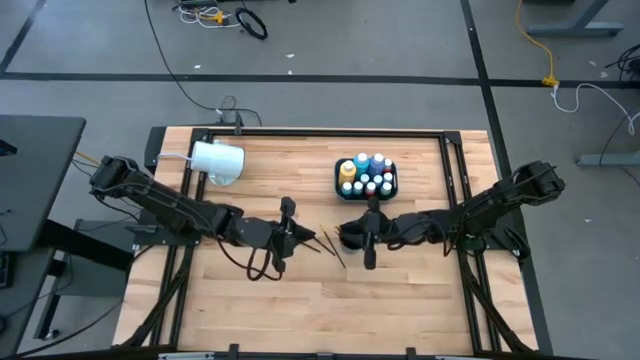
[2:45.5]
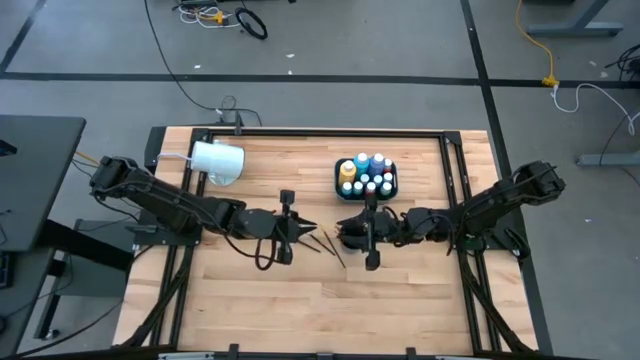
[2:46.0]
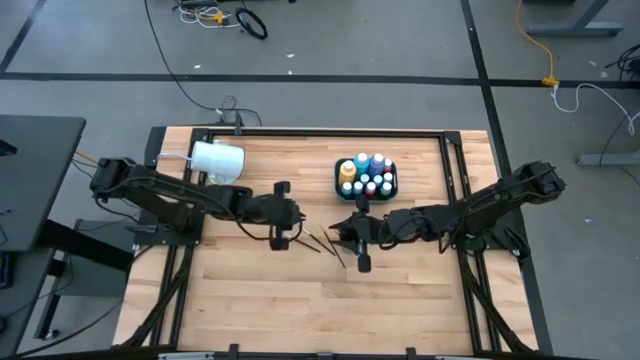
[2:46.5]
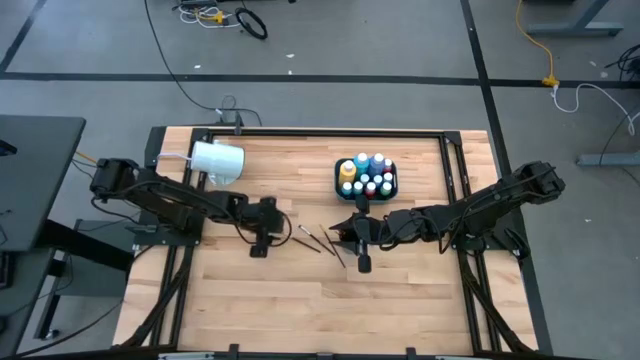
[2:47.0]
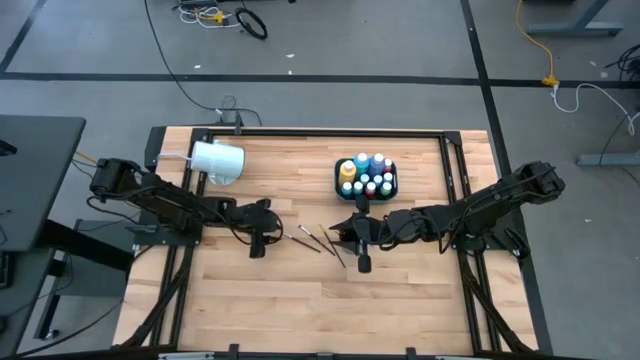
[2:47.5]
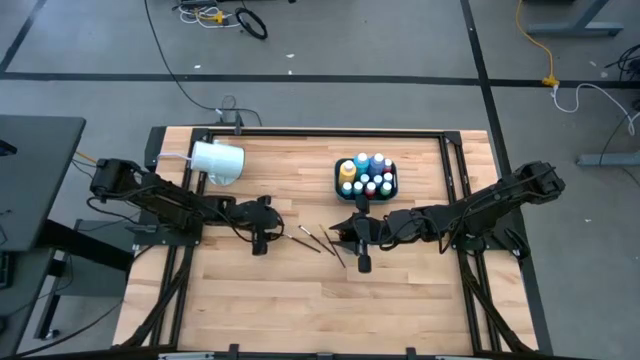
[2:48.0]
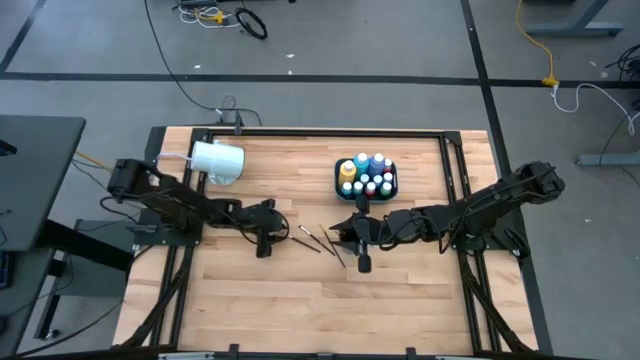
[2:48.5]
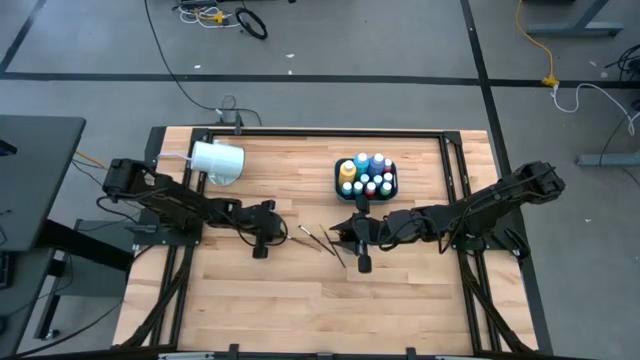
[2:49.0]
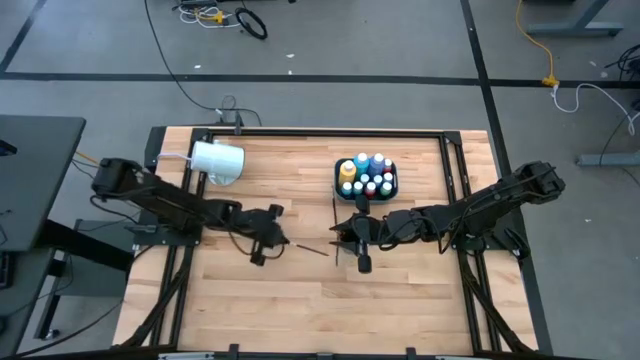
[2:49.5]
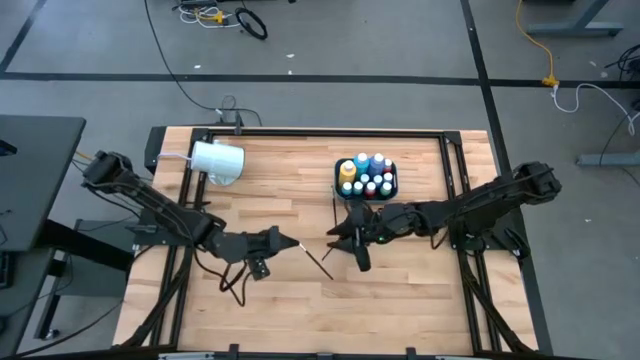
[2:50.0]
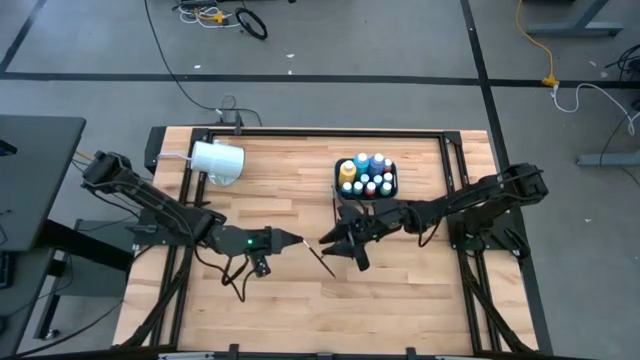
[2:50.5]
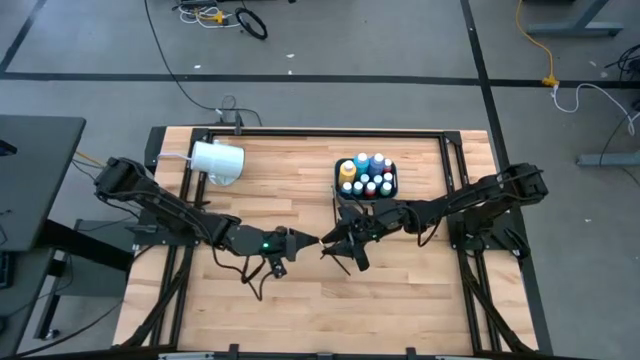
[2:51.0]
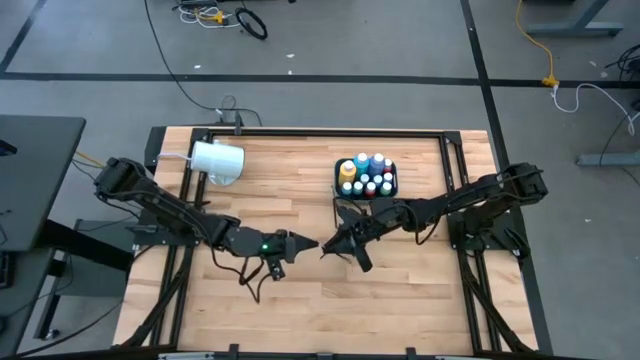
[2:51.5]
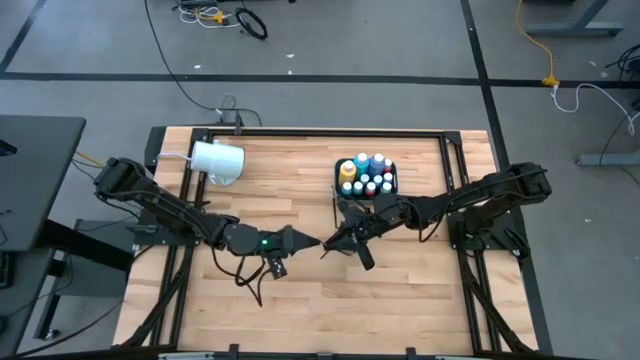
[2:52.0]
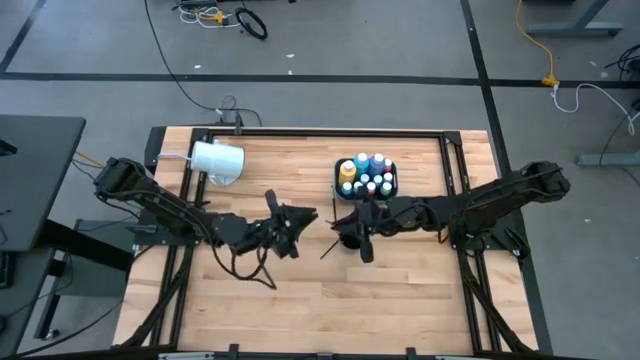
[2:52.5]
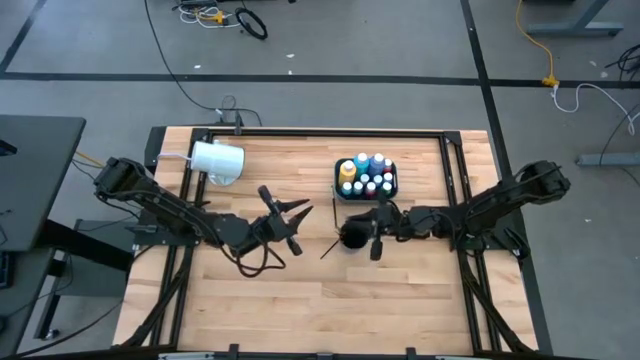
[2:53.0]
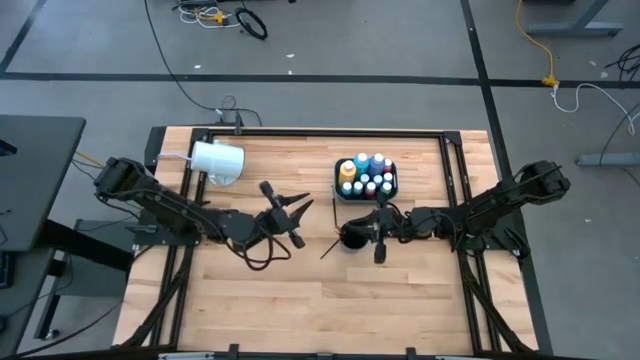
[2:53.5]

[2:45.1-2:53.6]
Task: Pick & Place Paint Supplies
Put the left silver paint brush into the cup

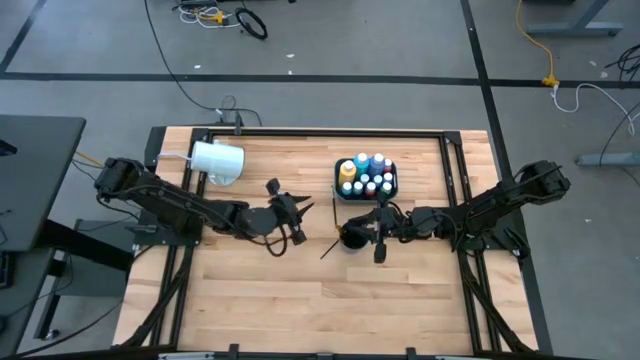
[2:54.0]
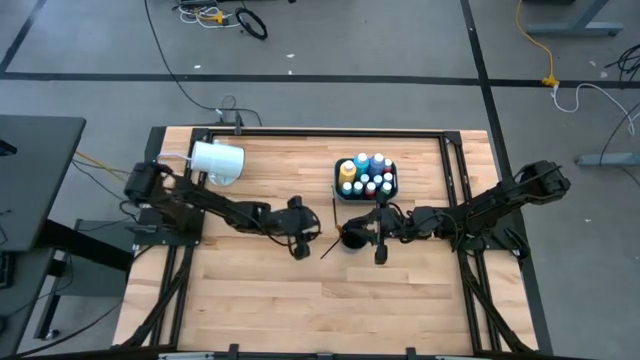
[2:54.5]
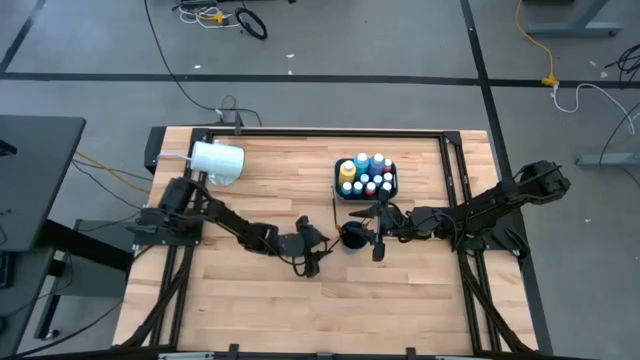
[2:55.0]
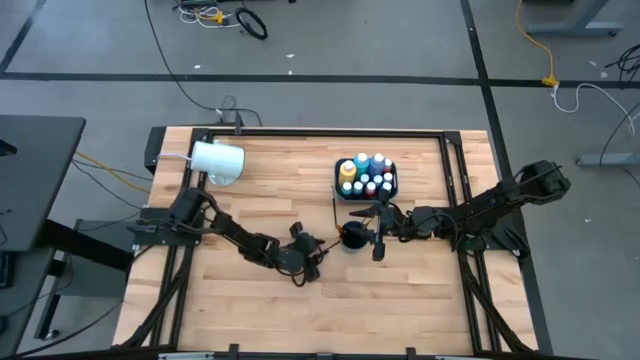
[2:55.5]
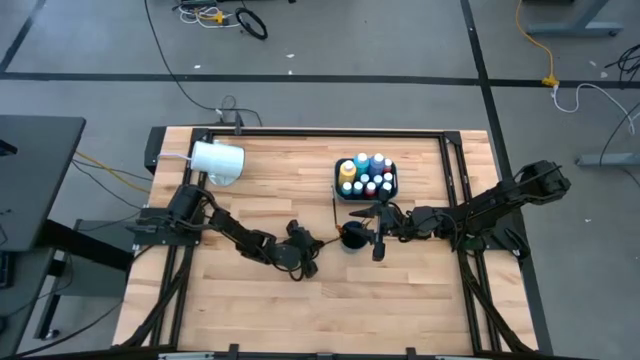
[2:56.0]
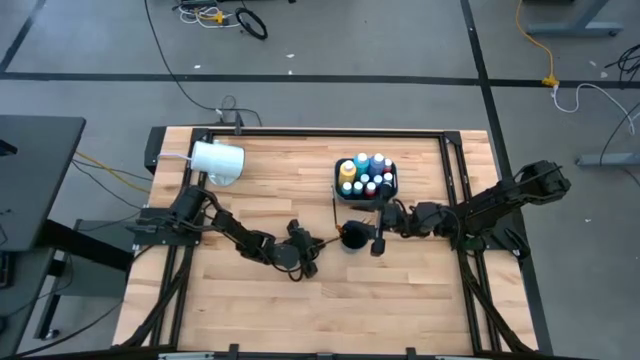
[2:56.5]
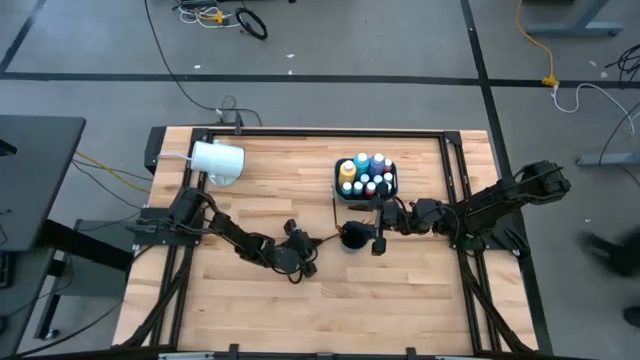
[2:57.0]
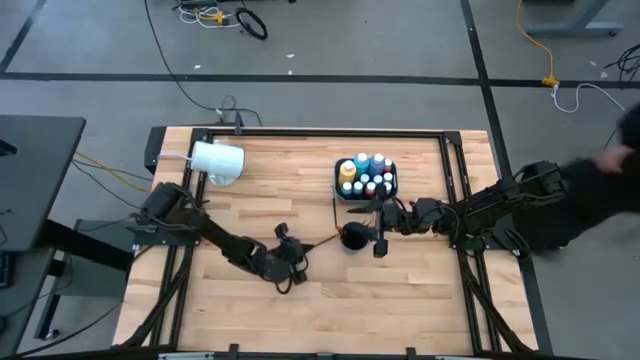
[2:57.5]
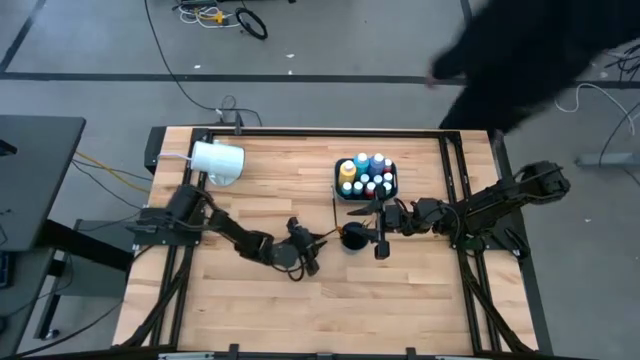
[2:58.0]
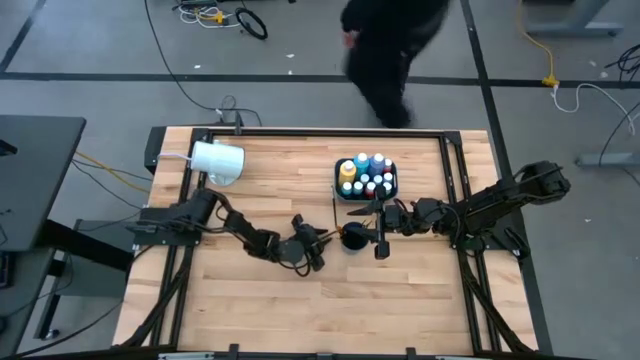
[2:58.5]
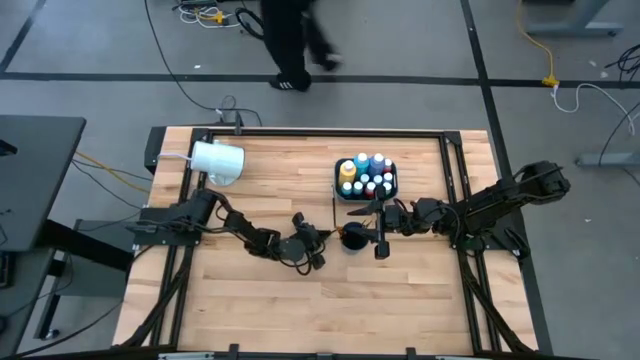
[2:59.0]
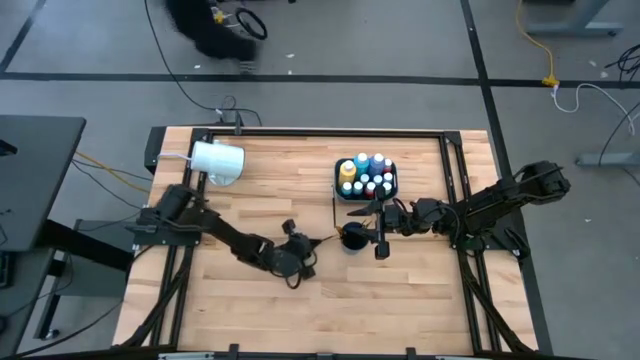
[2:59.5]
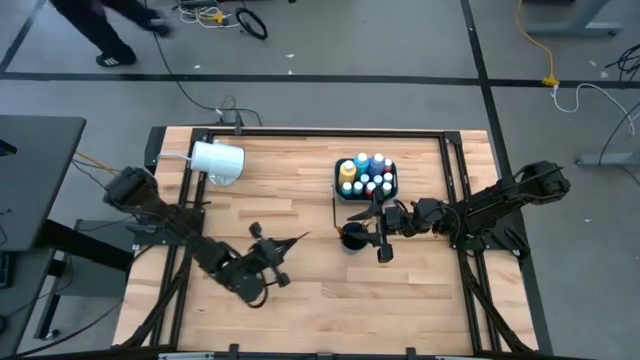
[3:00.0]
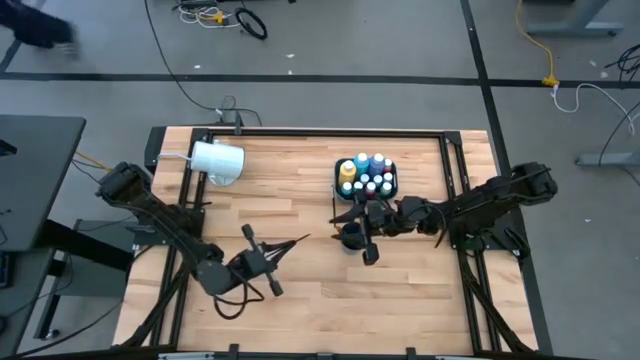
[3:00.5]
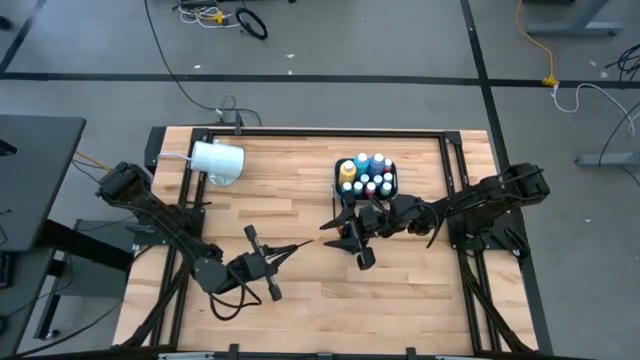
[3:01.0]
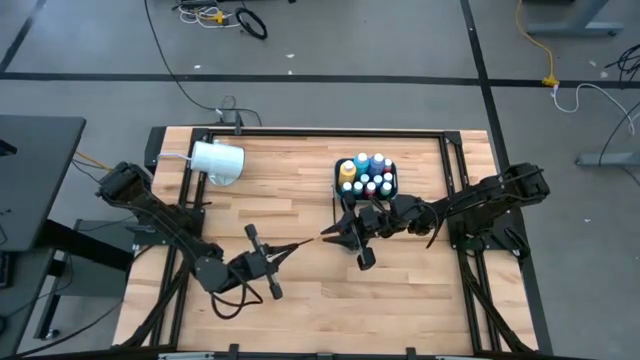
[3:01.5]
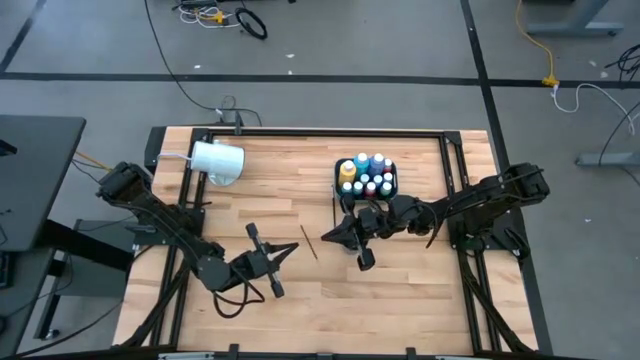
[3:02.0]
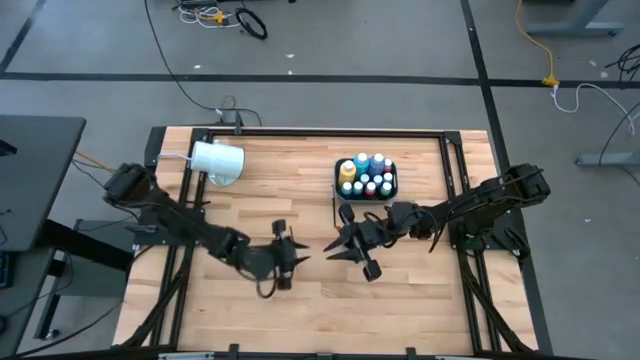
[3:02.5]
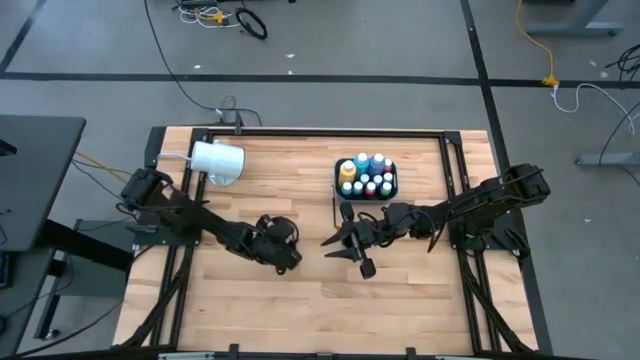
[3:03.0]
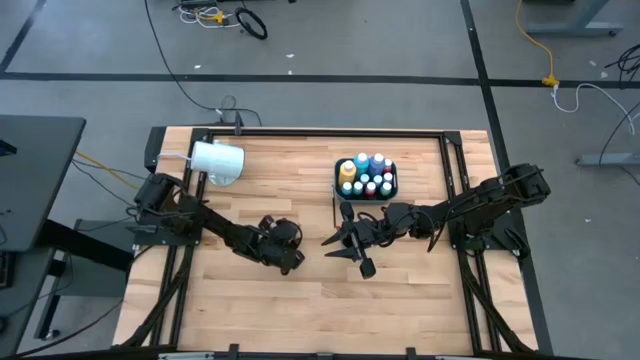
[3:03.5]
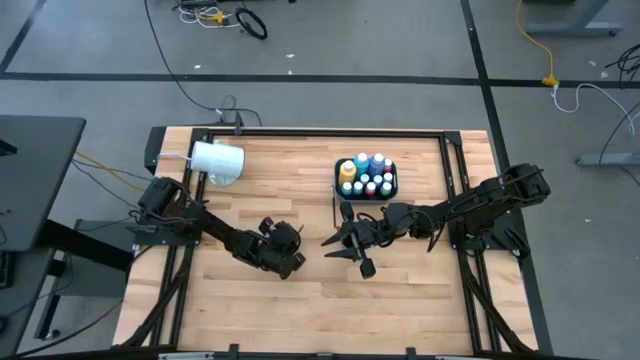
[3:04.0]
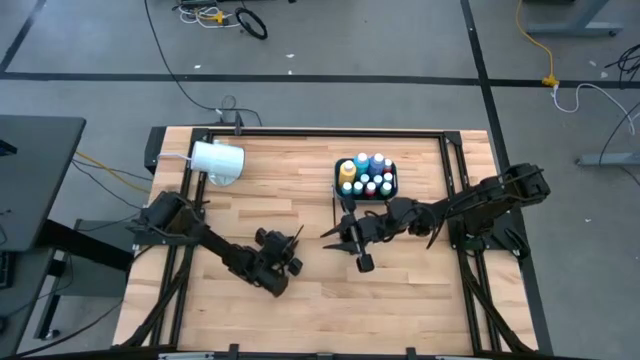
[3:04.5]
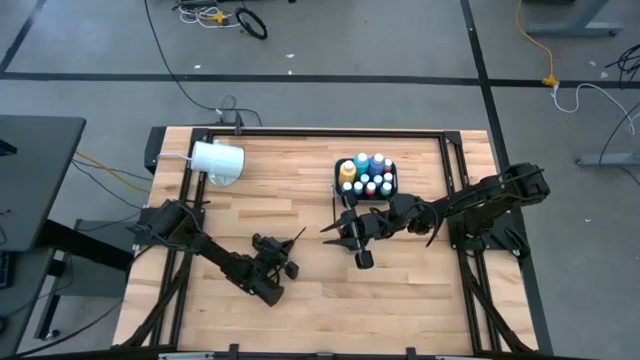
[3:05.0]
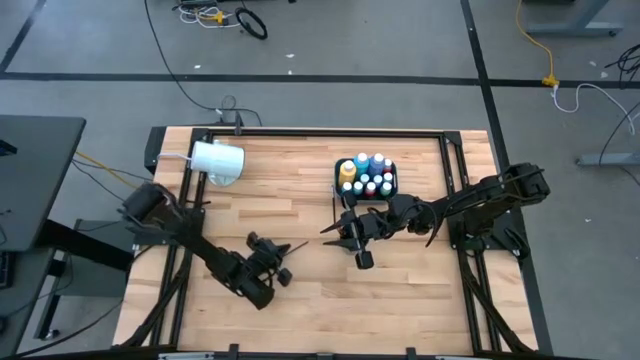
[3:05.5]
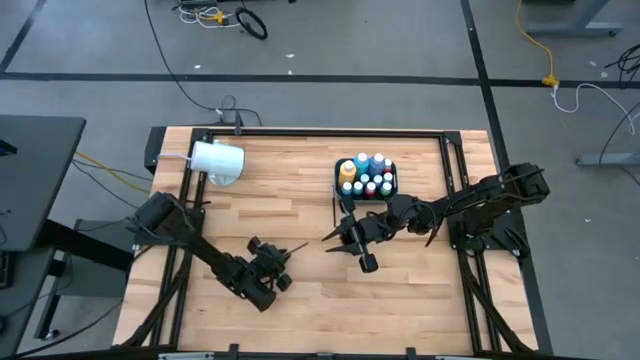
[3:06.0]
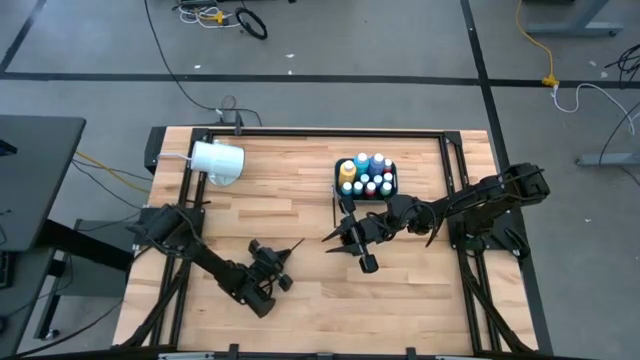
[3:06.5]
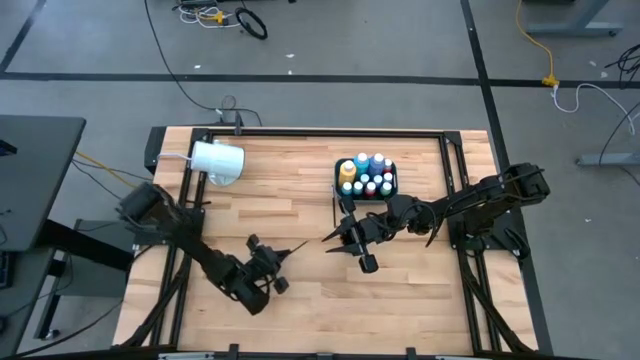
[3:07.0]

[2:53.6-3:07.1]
Put the gold paint brush into the cup
